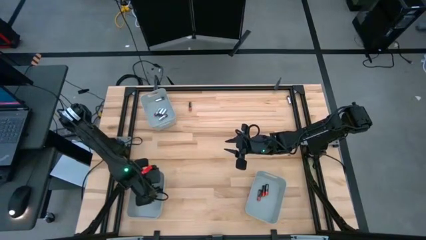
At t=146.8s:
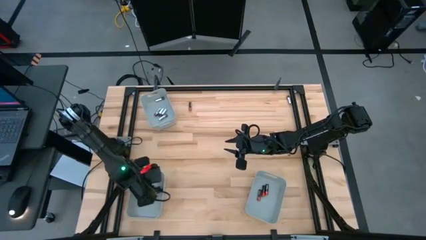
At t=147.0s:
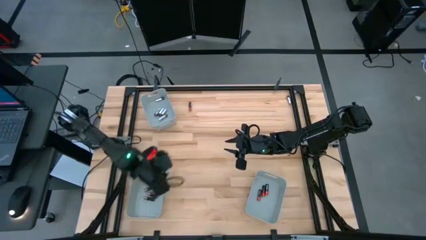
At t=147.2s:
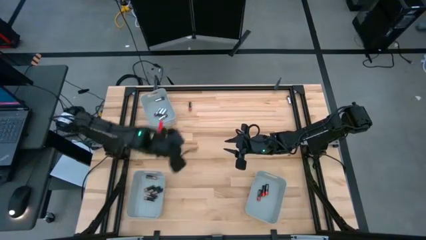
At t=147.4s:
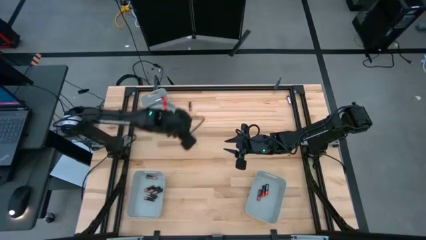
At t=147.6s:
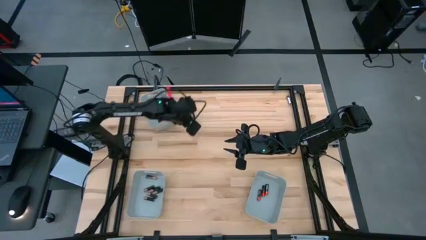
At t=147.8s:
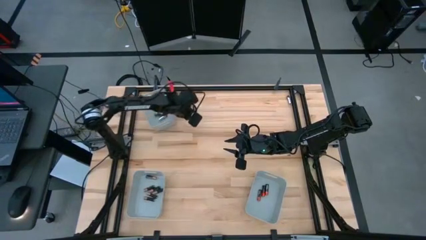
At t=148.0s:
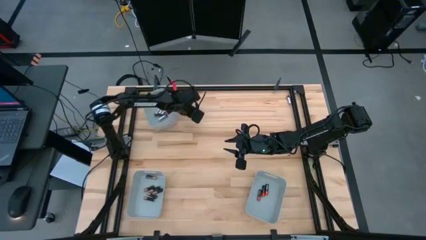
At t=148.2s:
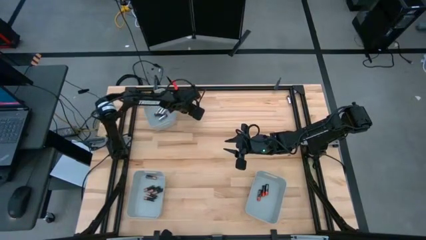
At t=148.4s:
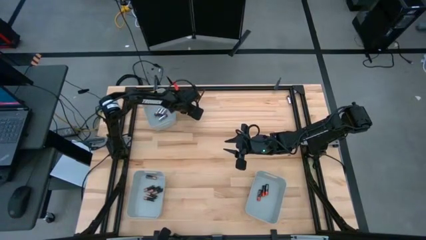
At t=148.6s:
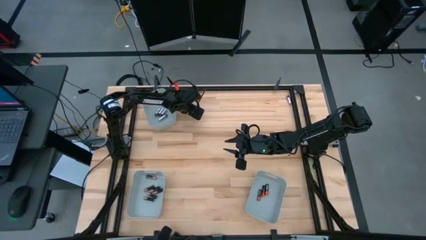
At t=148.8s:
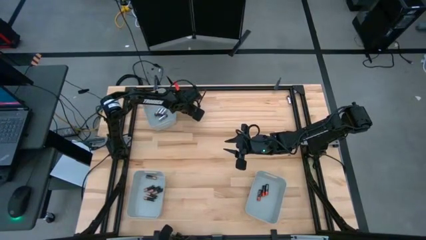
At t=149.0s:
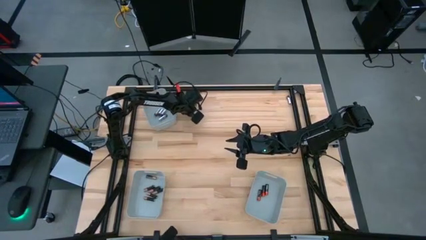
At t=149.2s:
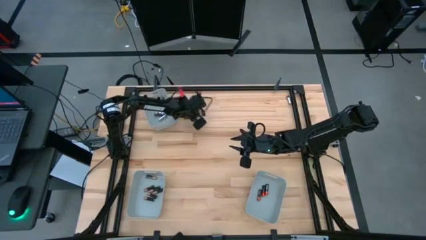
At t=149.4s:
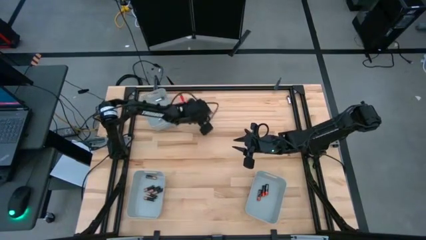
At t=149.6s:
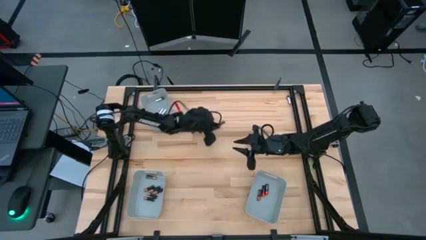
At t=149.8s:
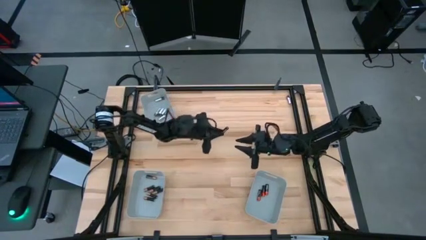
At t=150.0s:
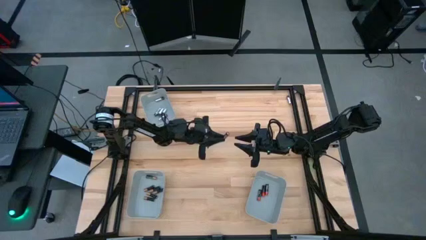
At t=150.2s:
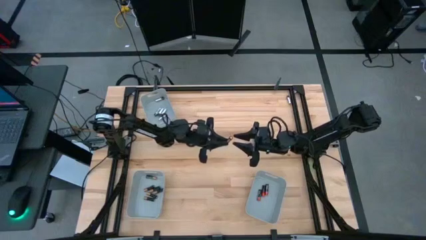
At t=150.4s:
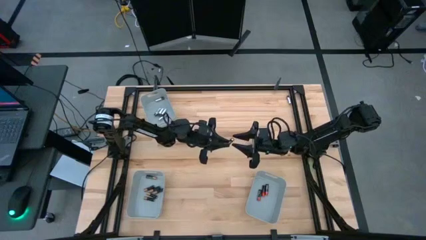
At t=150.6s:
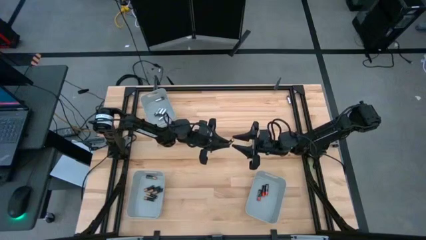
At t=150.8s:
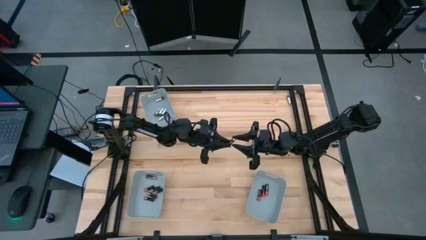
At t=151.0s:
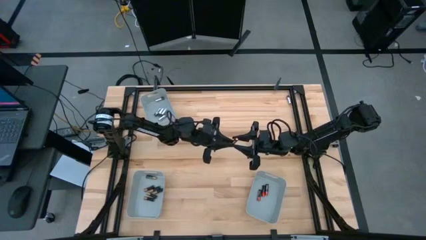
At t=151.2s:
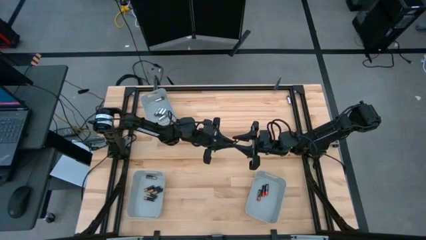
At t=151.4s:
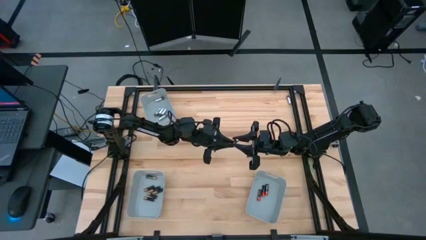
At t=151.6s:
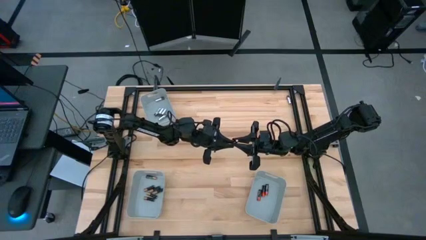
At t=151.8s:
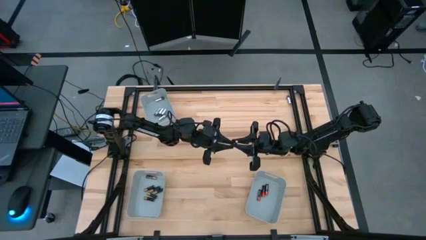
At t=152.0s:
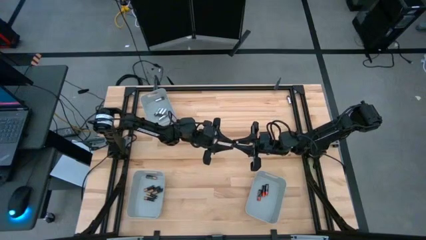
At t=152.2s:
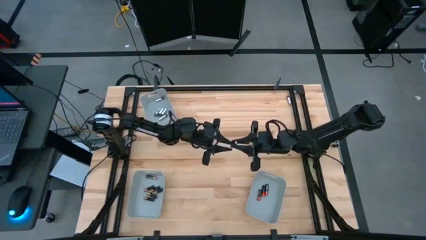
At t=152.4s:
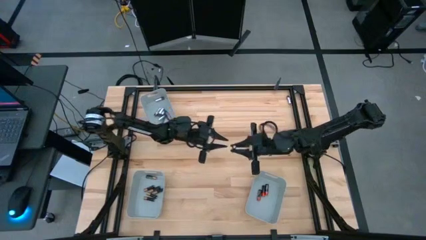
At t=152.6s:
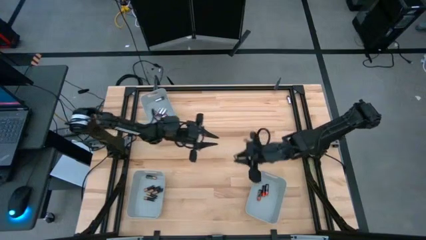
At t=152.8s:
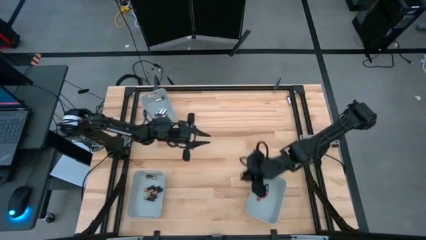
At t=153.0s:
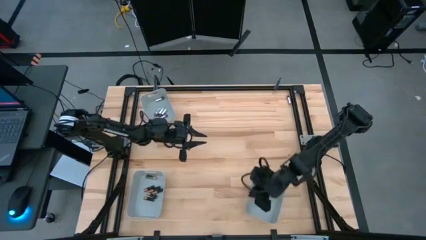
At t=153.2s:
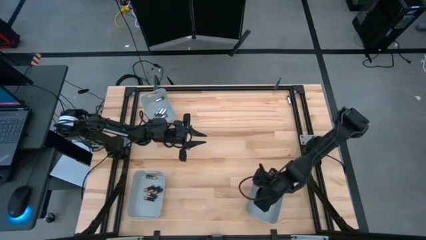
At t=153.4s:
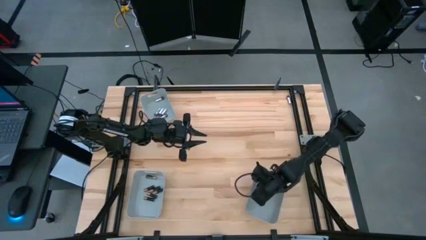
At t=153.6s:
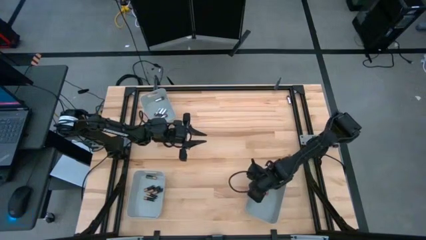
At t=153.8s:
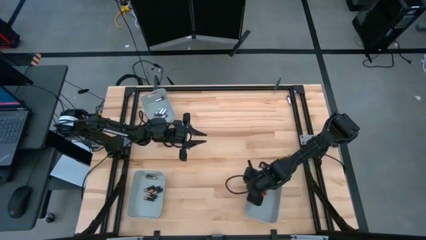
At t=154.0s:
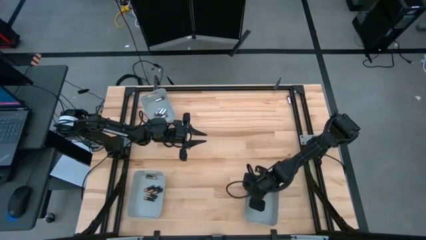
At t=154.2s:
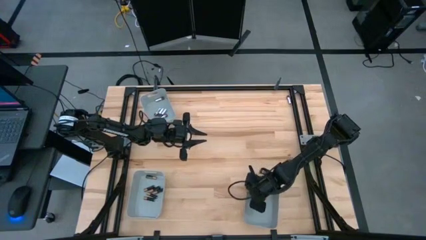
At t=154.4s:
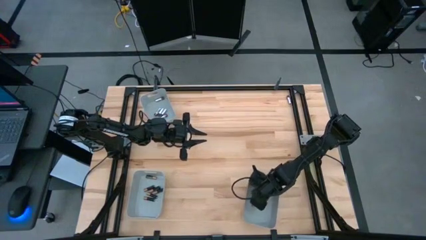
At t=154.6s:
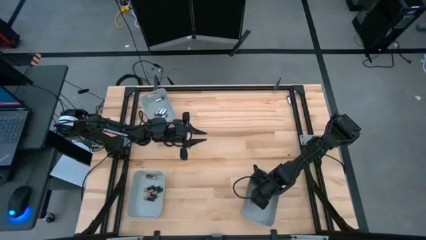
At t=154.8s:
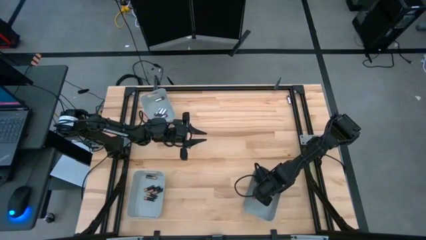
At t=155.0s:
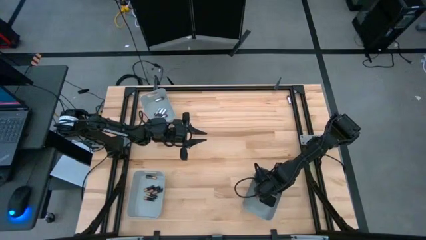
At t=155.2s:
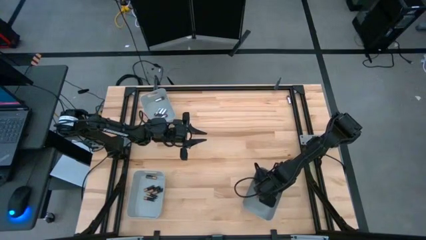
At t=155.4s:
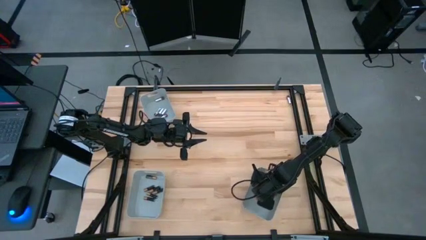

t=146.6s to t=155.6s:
Task: Sort batteries
Put the black-red battery into the bottom right gray bin

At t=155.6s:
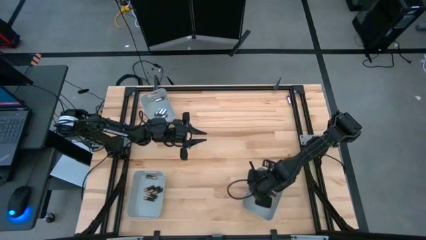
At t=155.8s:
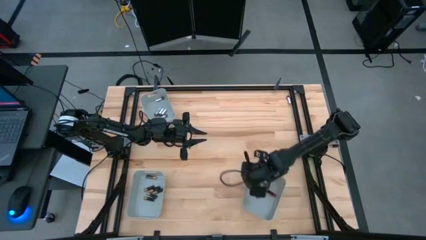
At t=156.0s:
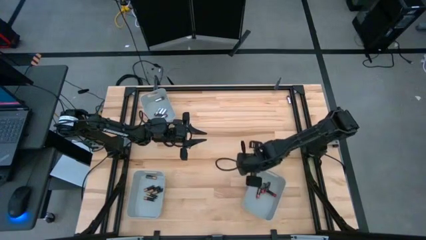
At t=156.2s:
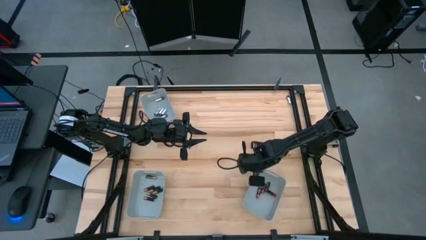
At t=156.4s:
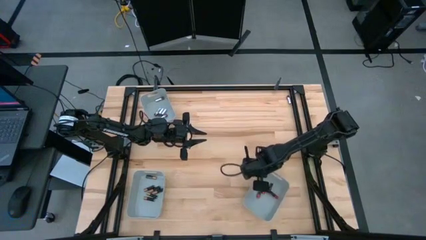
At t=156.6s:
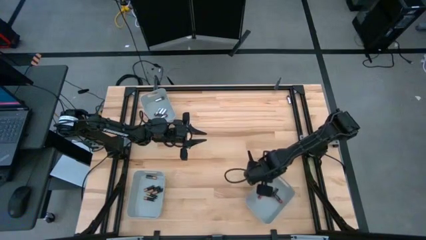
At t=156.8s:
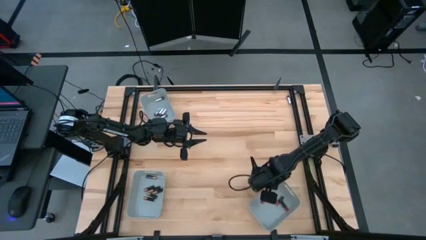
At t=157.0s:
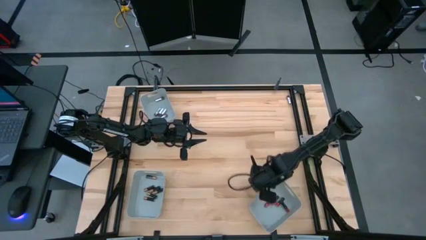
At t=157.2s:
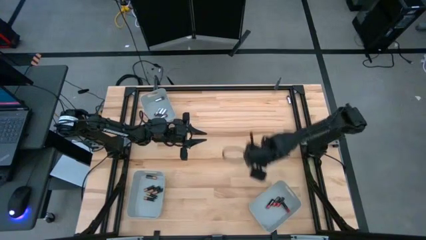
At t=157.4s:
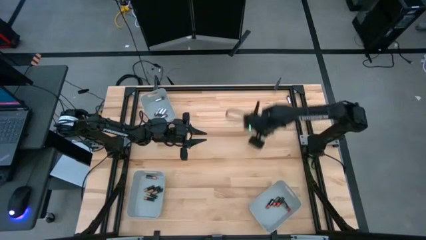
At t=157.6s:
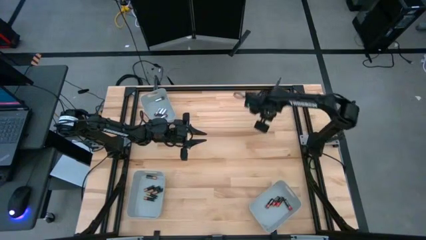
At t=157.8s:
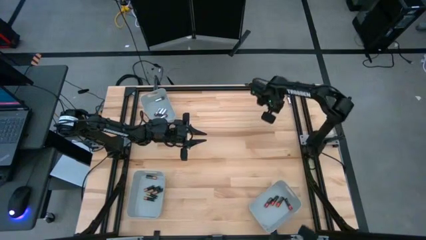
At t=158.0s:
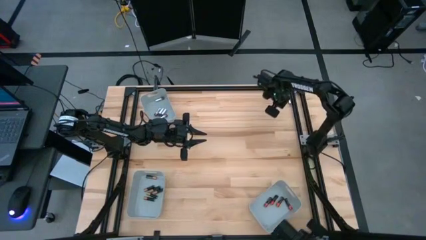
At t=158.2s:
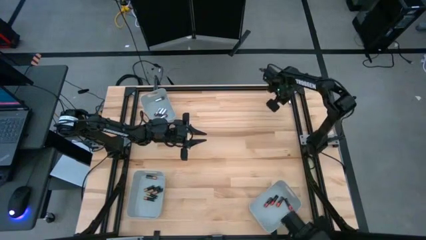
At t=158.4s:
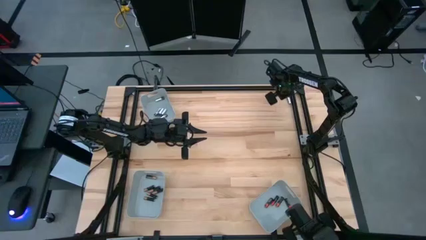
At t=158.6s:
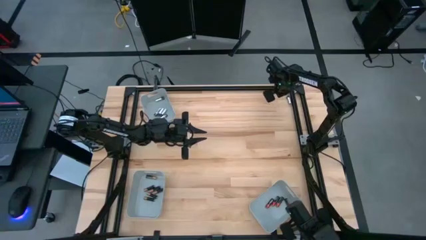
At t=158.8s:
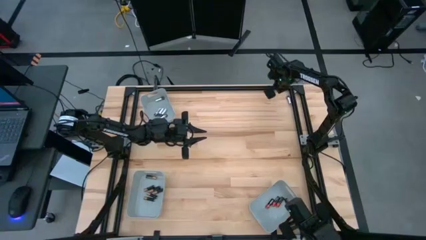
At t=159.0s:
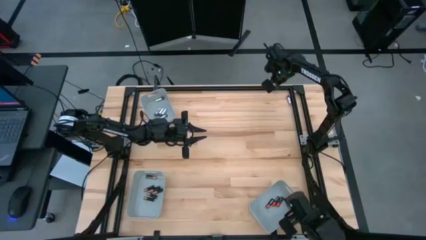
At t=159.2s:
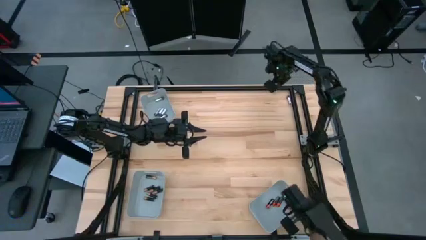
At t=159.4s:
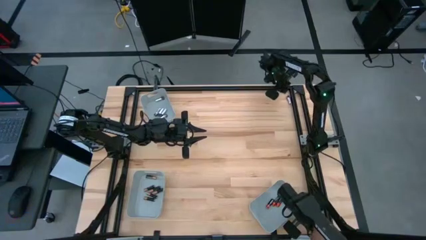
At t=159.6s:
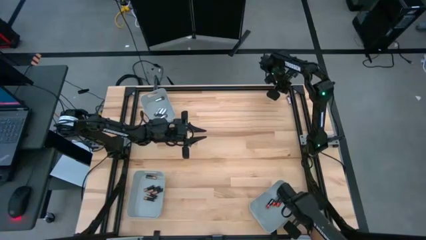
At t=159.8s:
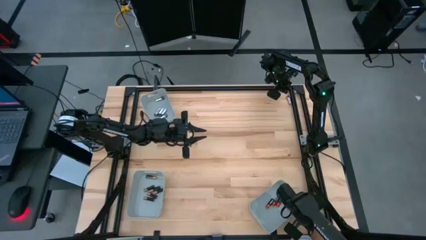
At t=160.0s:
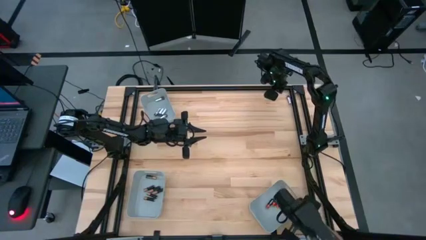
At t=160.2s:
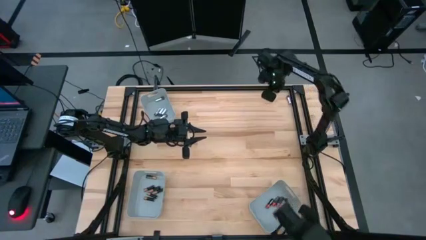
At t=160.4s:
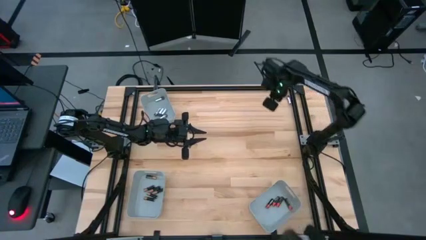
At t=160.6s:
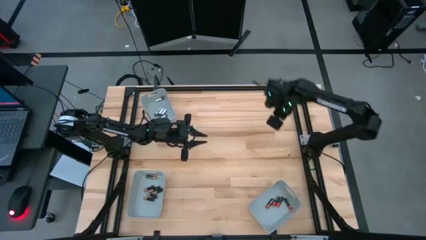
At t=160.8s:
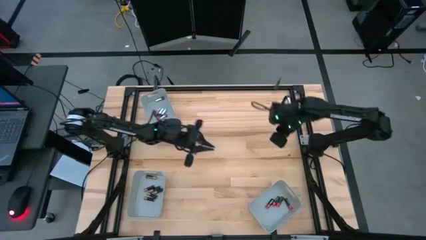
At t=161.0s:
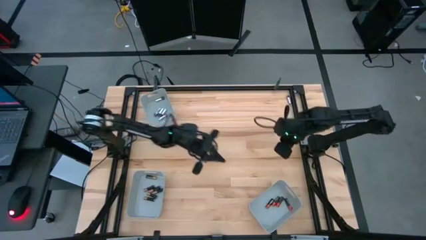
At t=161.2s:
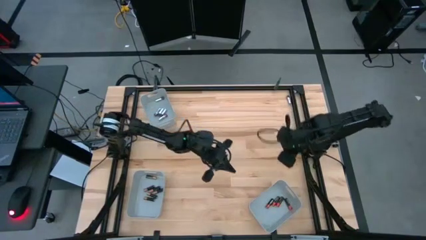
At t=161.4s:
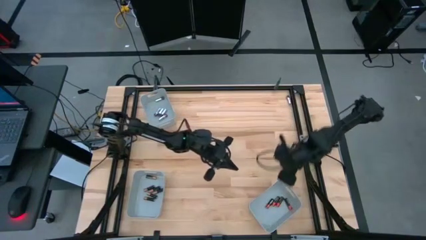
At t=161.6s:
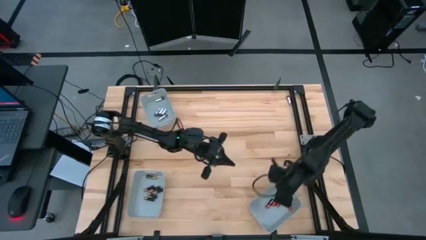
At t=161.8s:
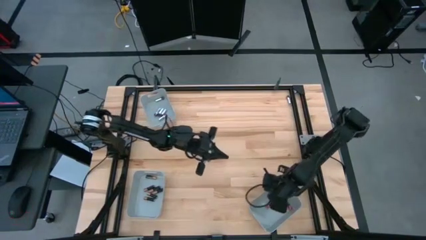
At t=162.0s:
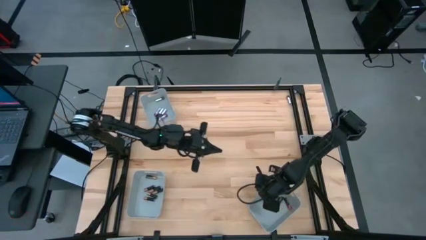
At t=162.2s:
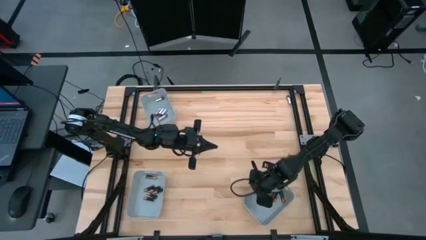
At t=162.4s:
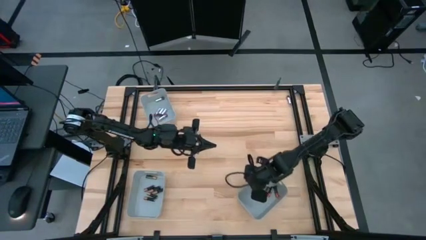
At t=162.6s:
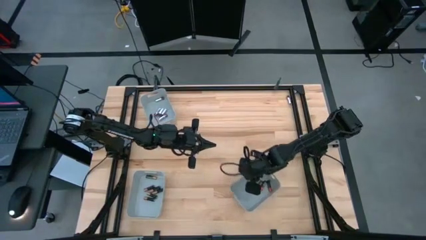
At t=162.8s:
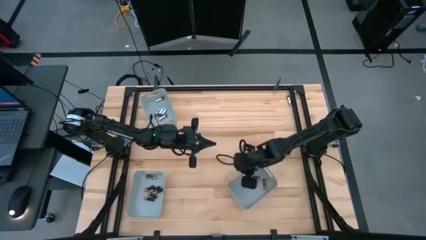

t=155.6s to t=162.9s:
Adjust the bottom right gray bin
